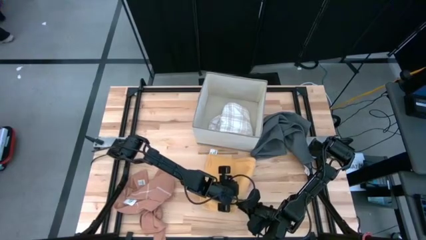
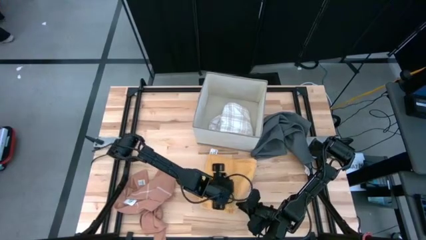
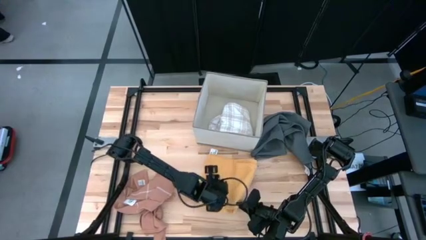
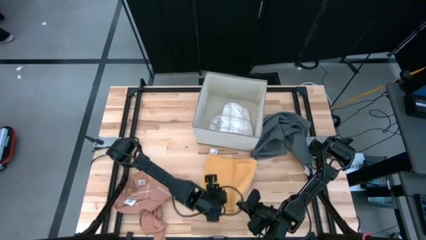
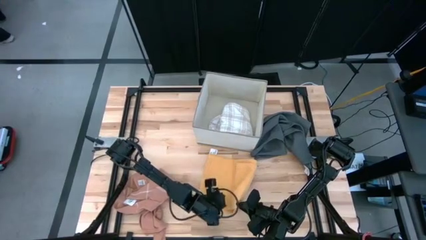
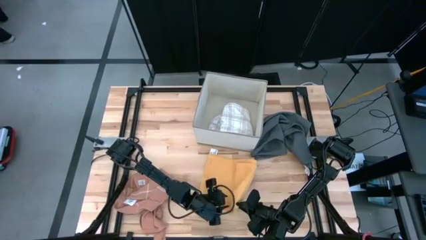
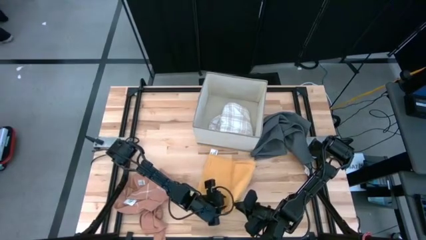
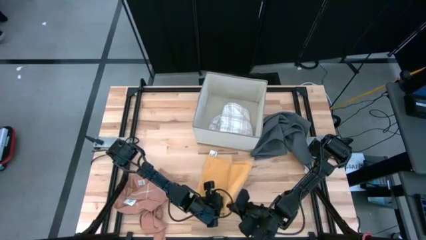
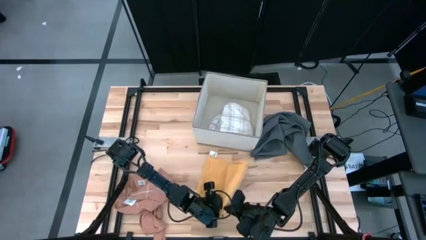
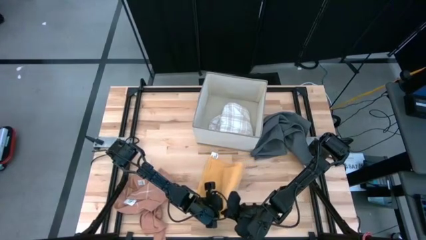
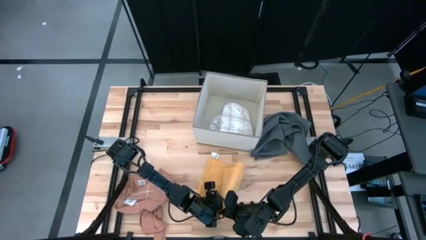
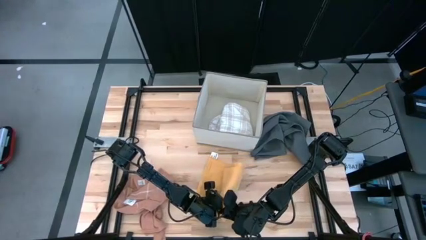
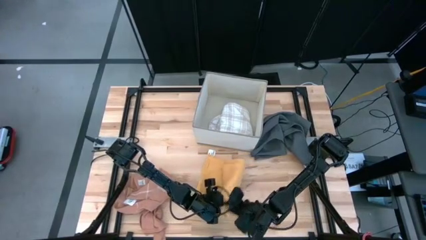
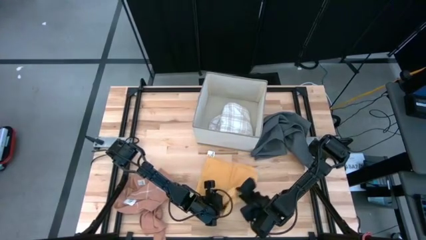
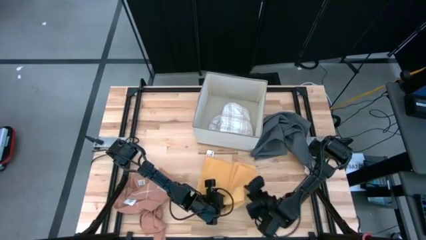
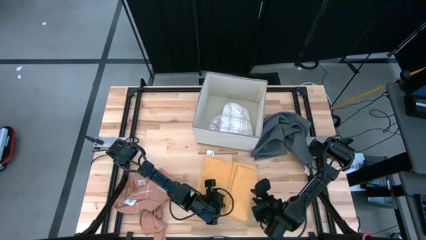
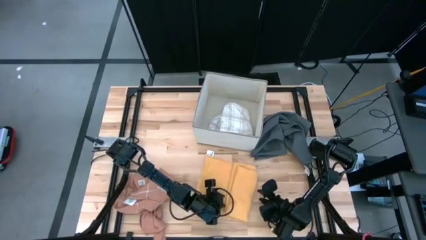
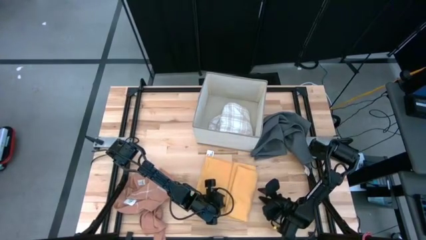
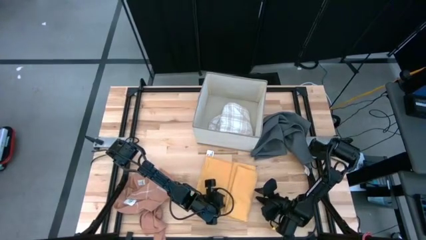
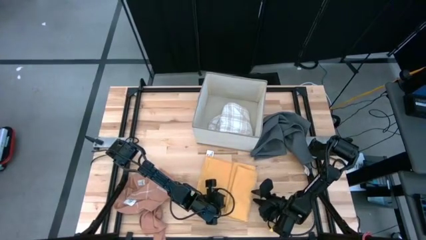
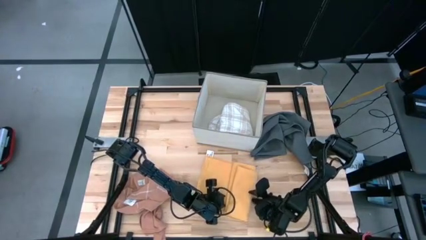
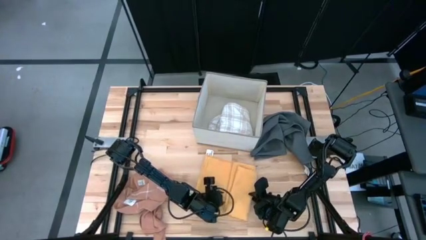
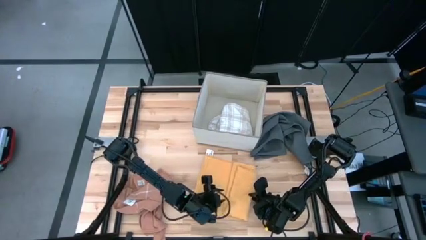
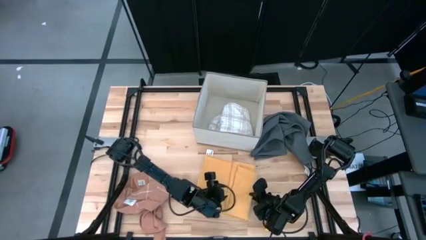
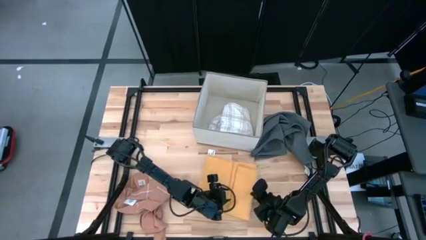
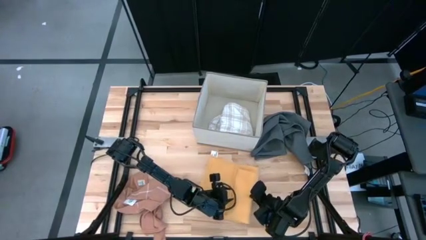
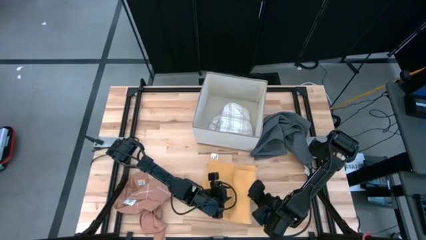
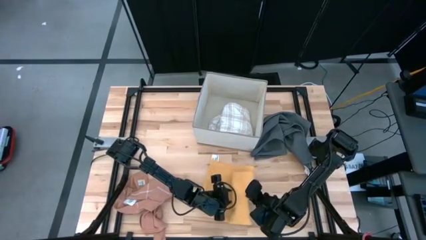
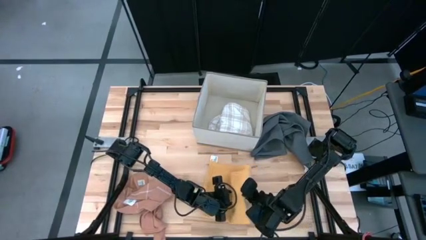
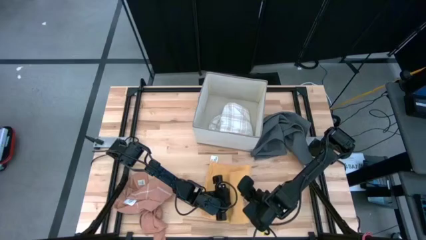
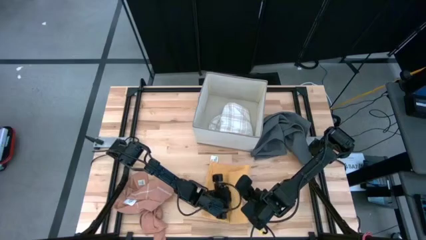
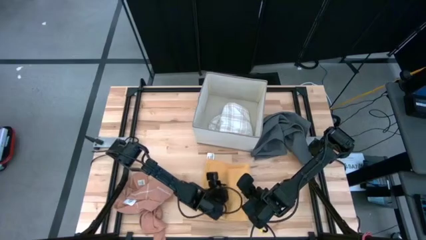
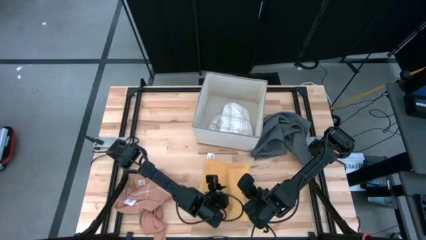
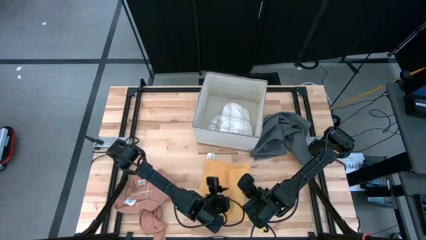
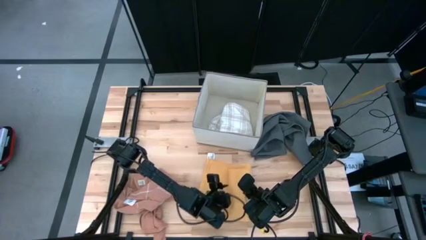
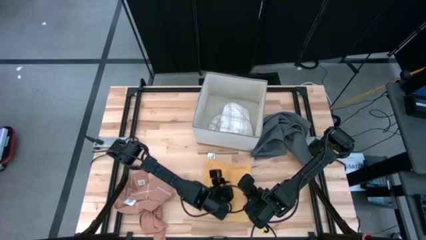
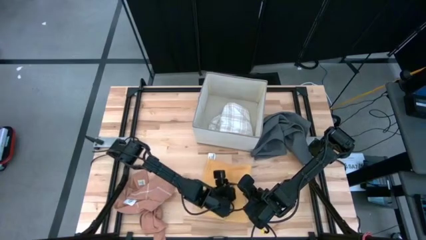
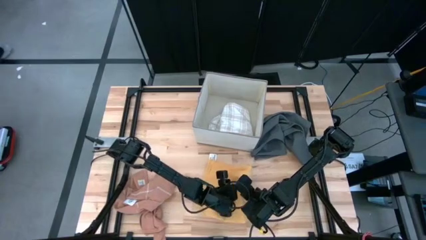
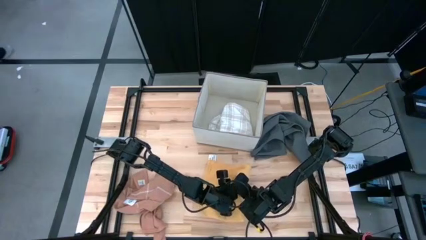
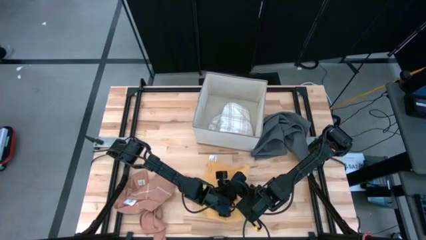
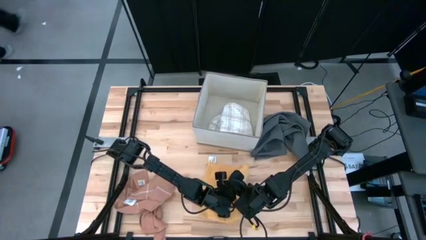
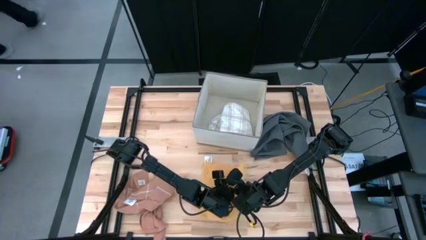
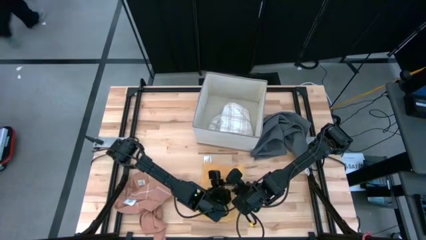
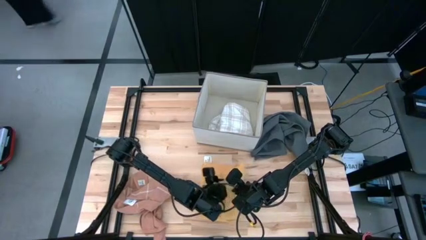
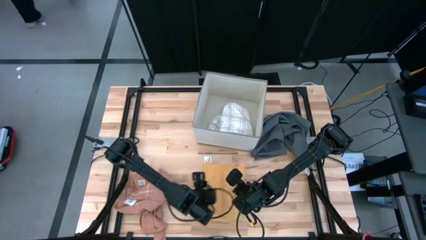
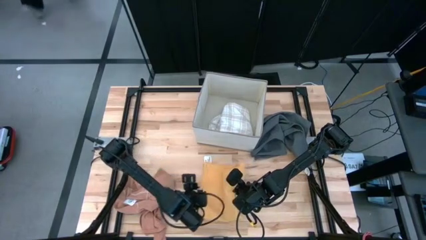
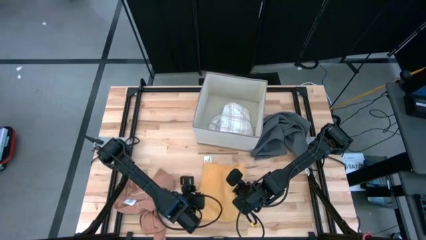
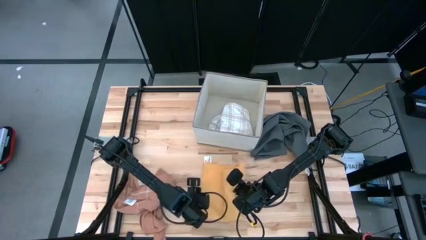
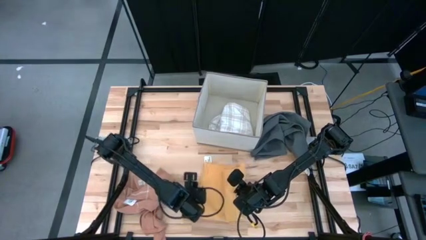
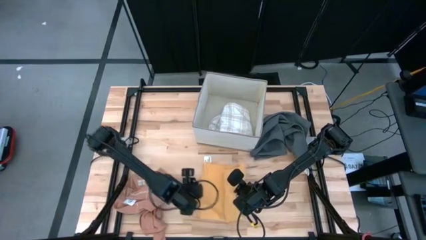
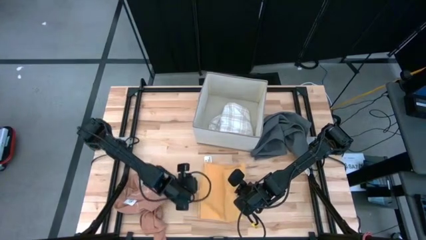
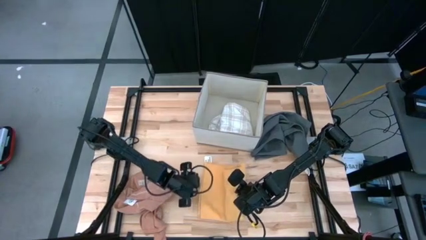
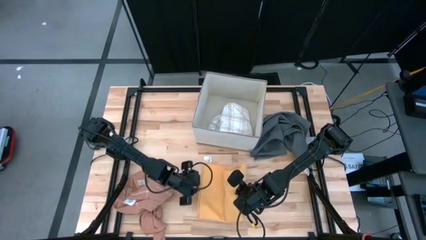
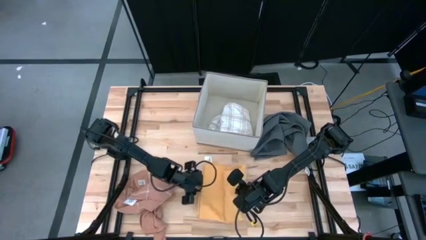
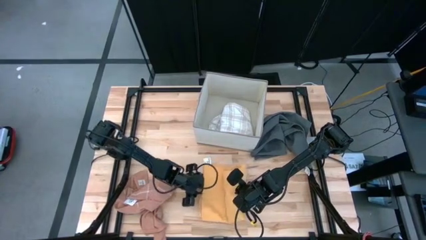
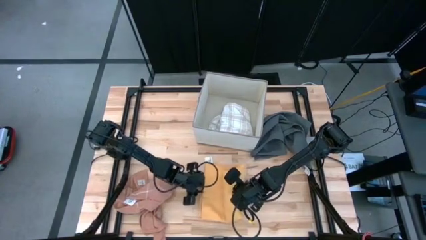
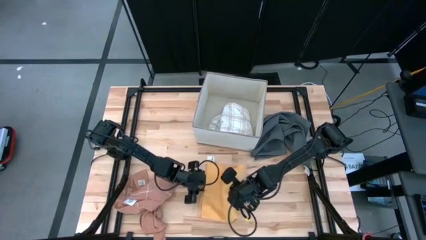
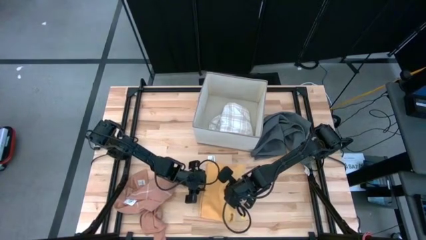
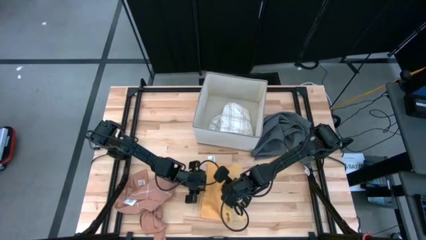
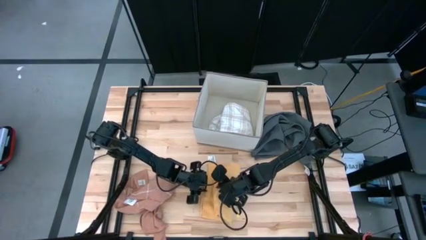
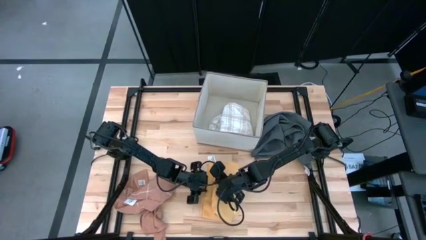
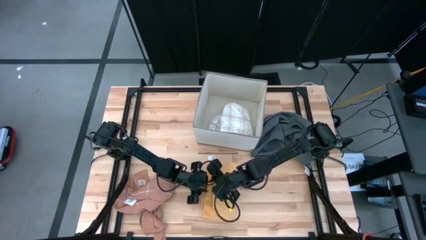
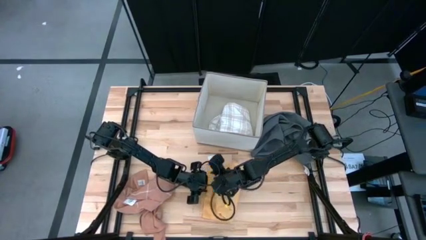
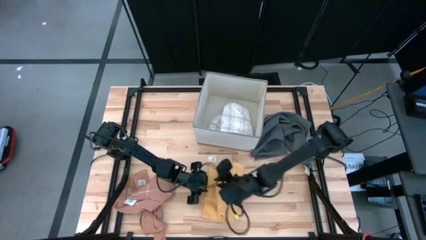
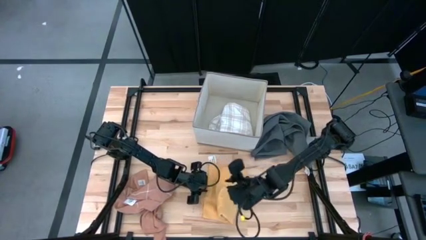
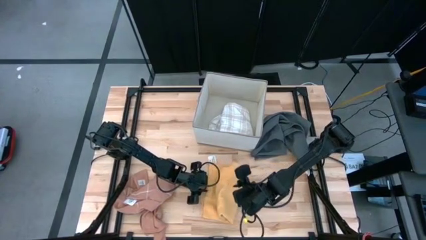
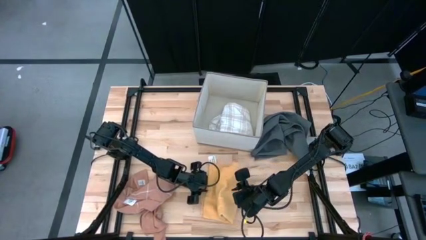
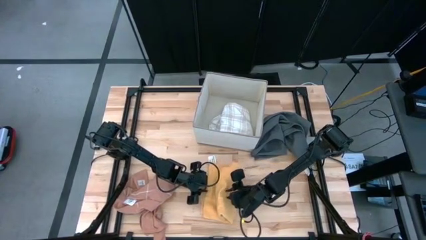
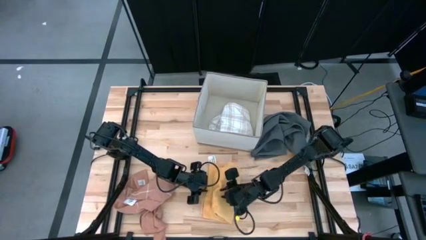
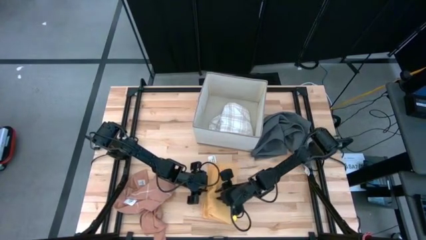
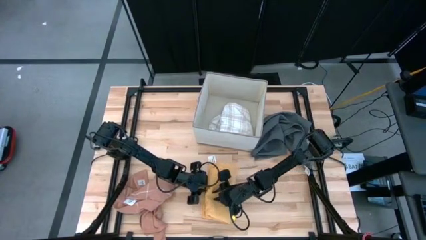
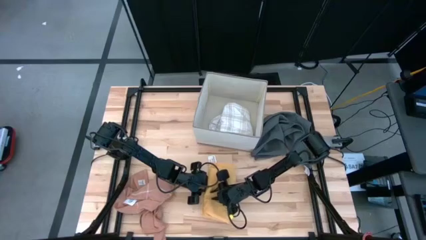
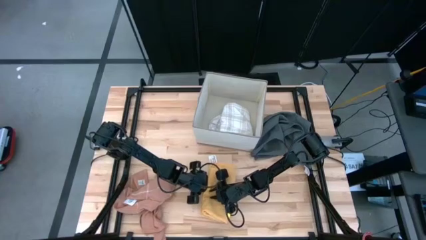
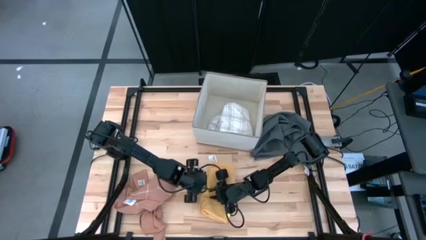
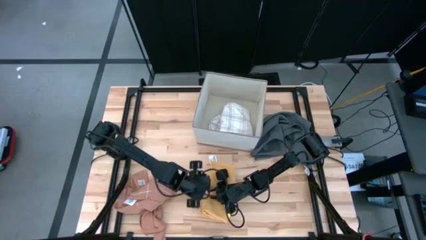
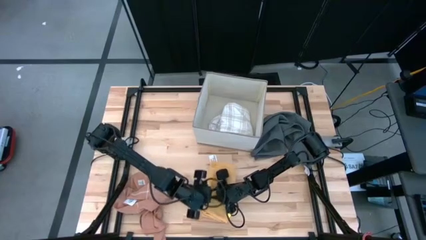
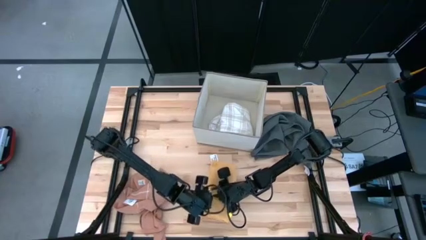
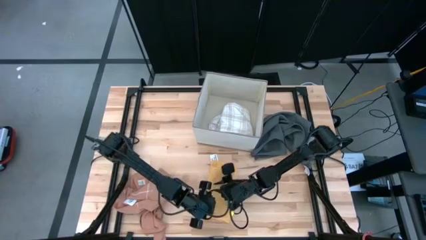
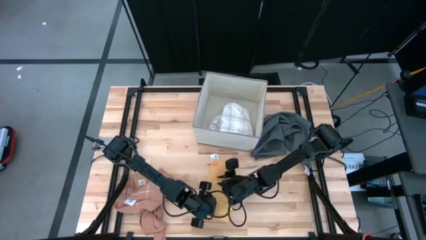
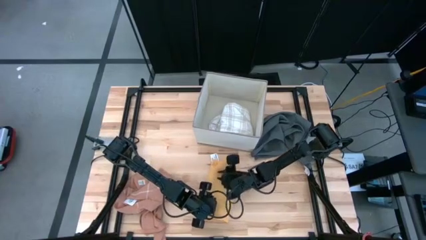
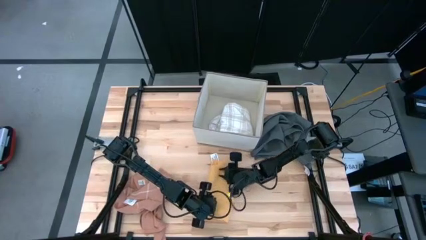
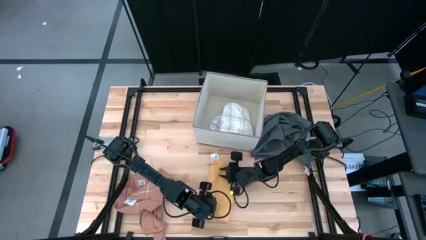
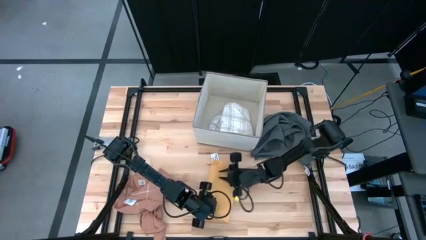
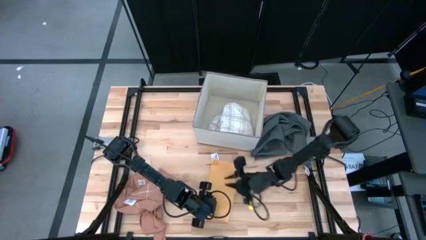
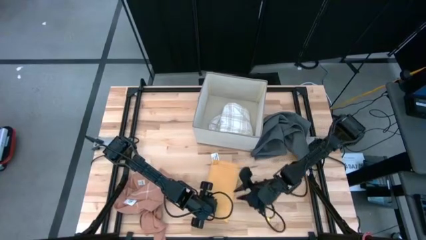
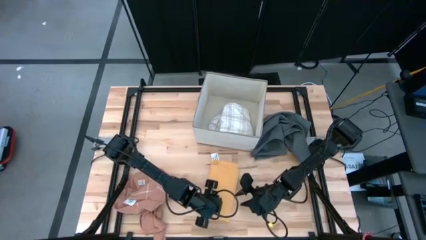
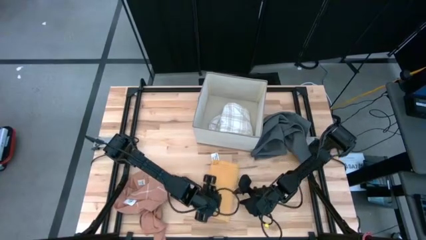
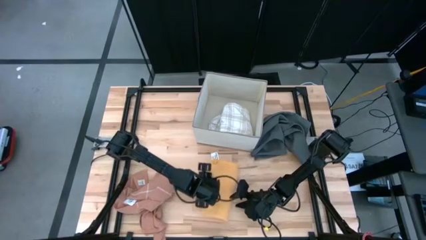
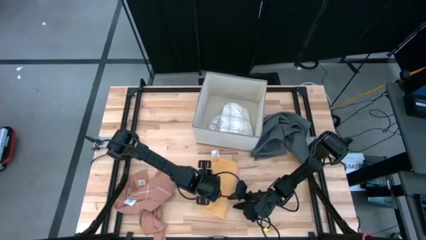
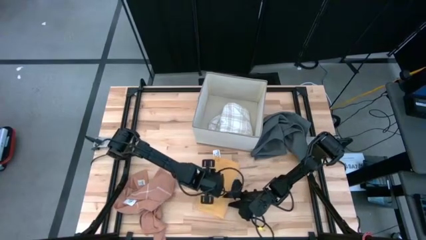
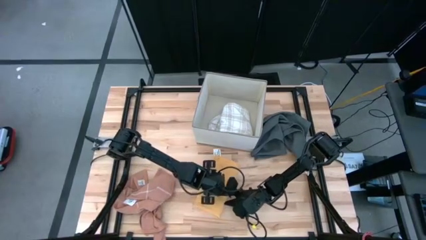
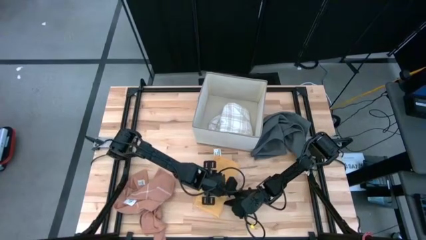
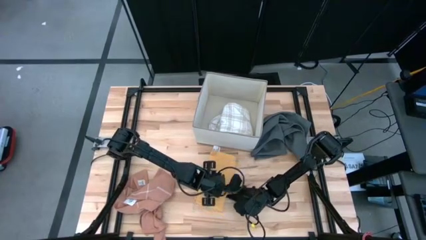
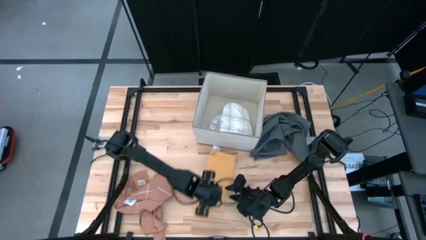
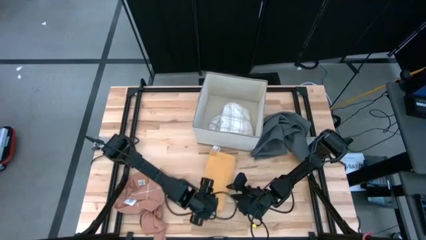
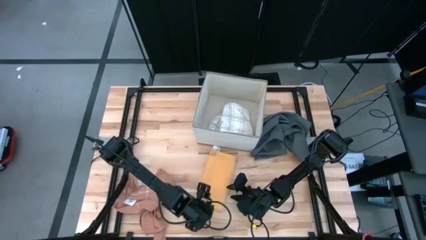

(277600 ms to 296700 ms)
Task: Fold towel
Fold the yellow towel
